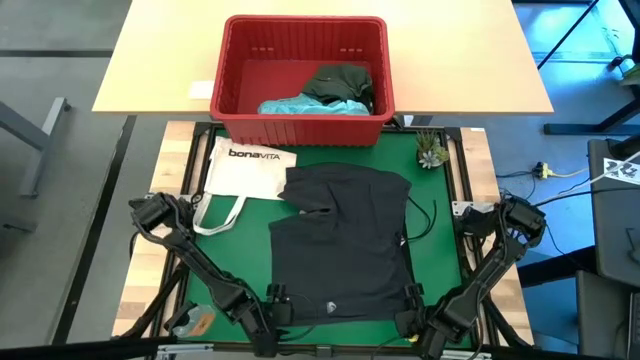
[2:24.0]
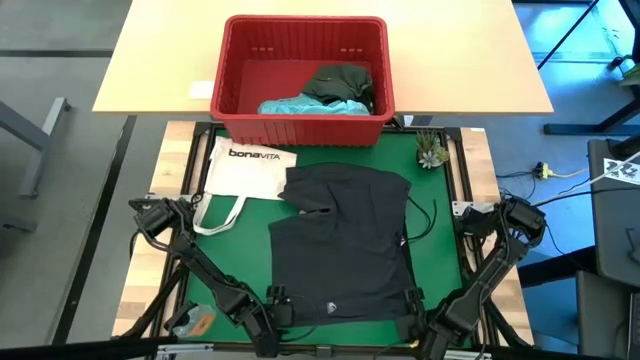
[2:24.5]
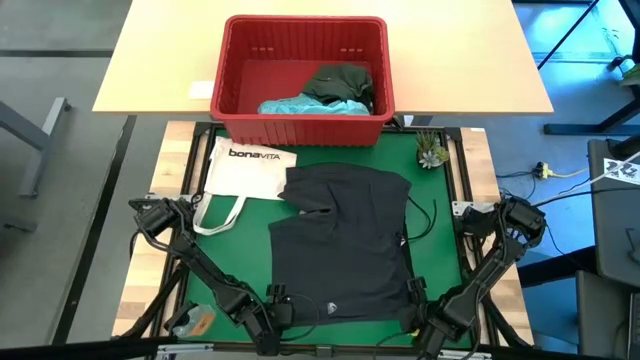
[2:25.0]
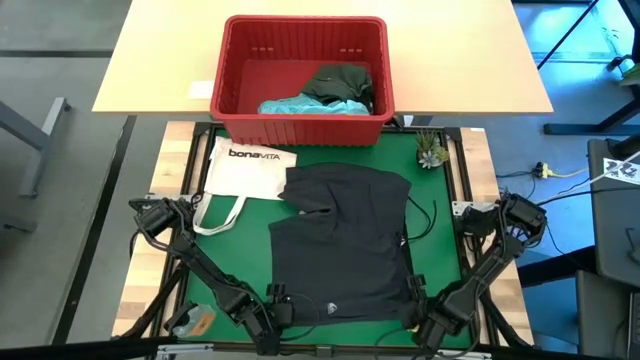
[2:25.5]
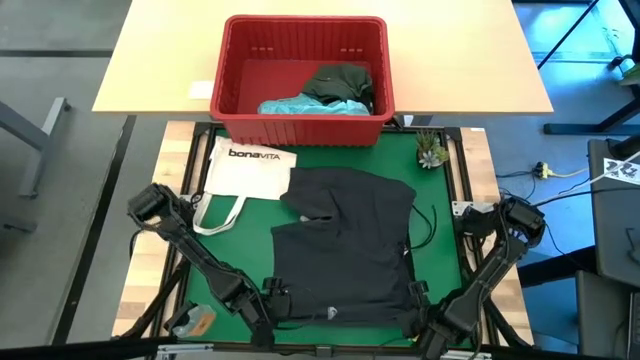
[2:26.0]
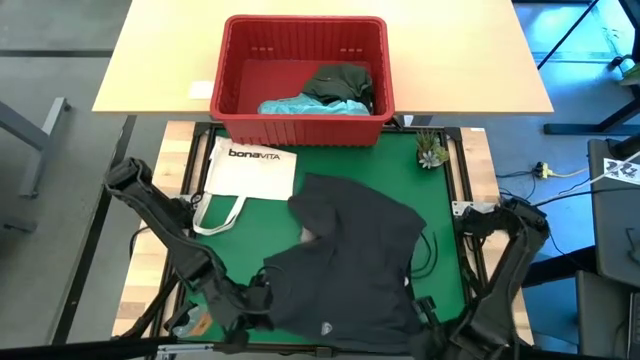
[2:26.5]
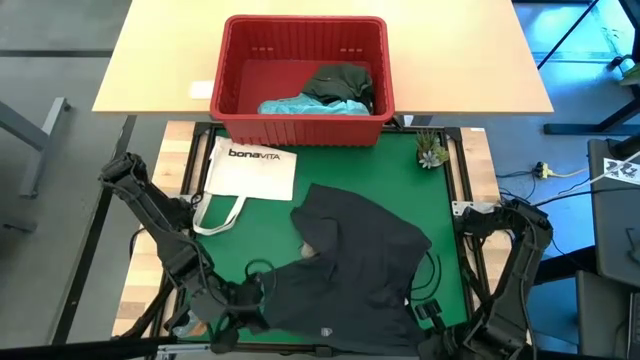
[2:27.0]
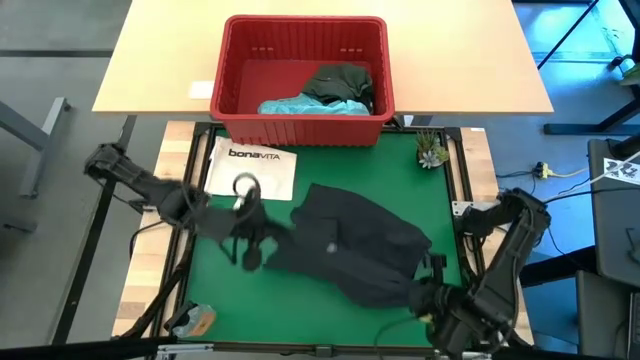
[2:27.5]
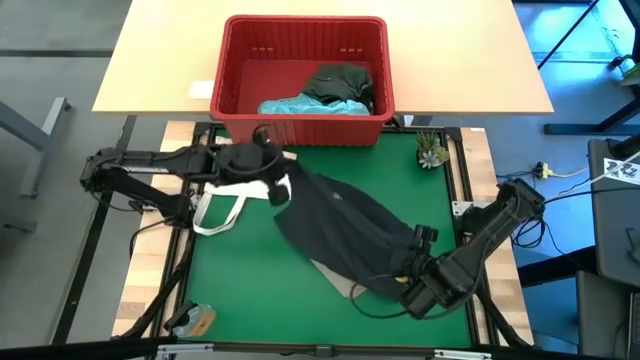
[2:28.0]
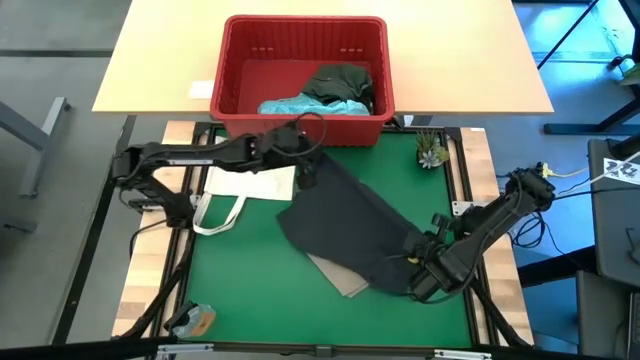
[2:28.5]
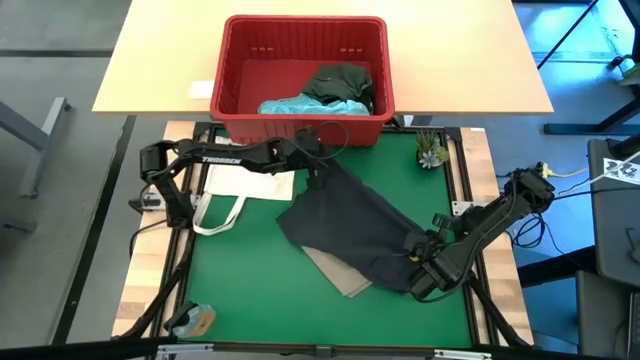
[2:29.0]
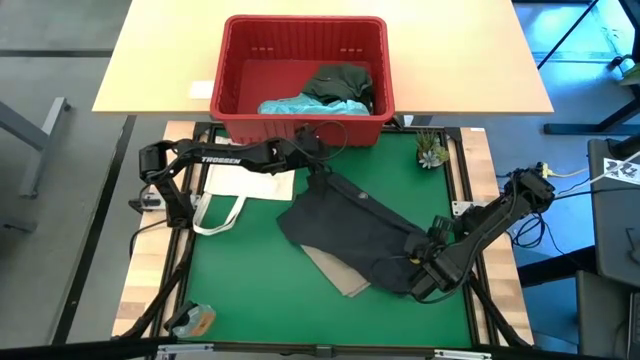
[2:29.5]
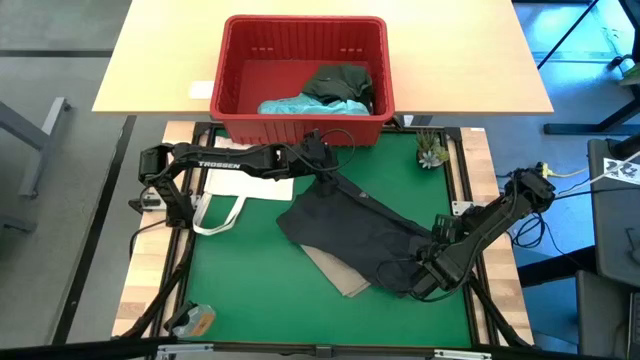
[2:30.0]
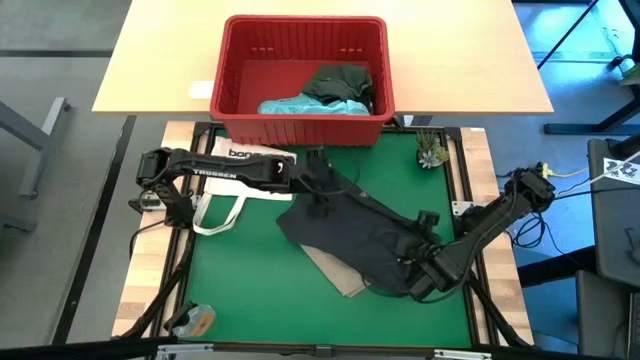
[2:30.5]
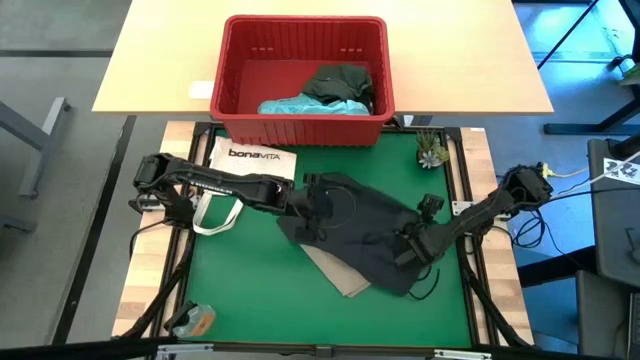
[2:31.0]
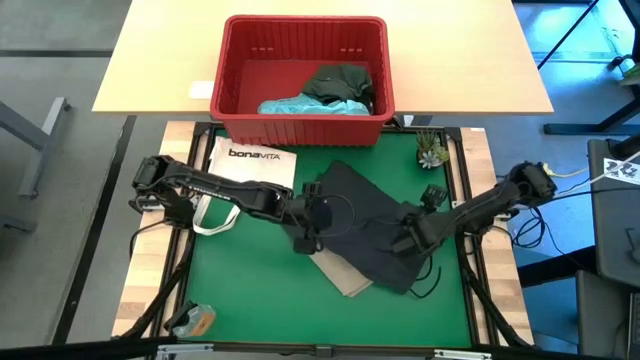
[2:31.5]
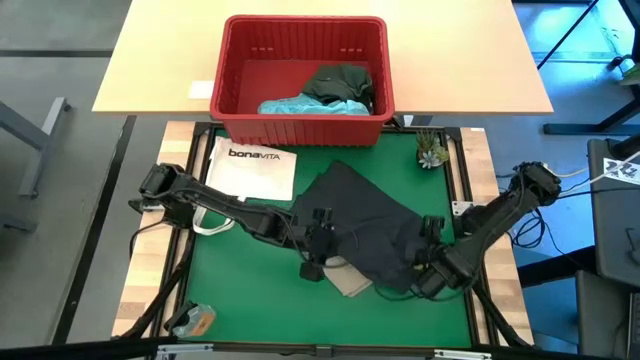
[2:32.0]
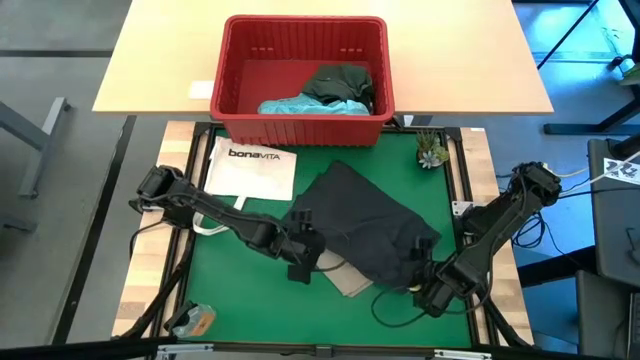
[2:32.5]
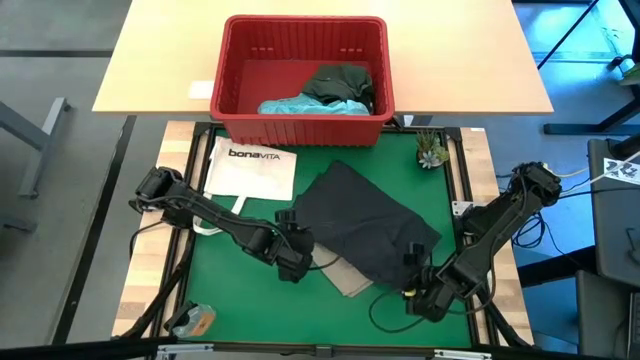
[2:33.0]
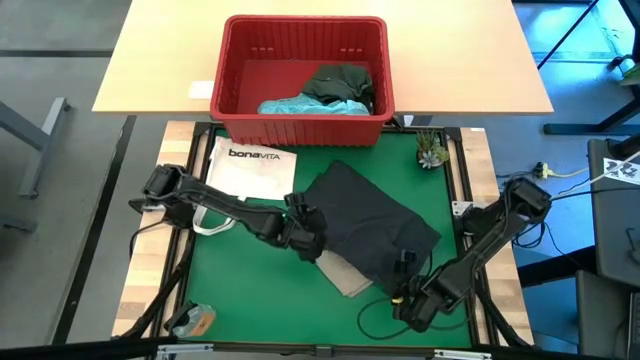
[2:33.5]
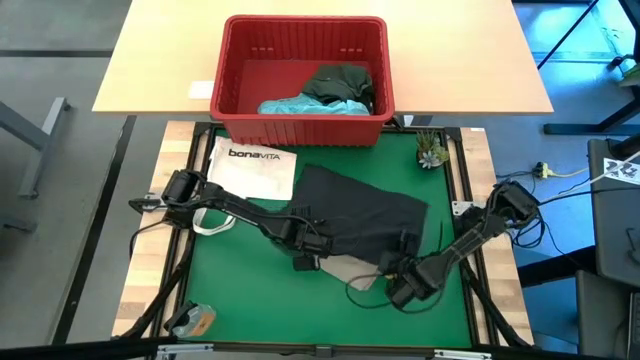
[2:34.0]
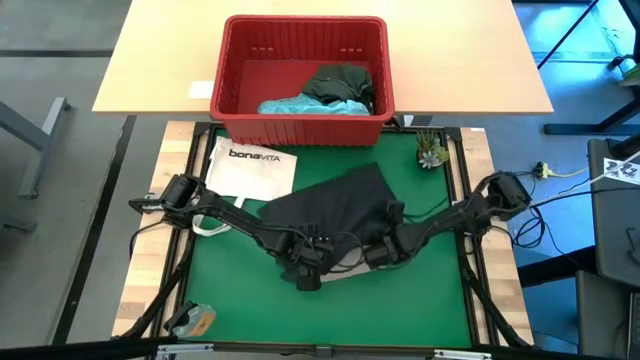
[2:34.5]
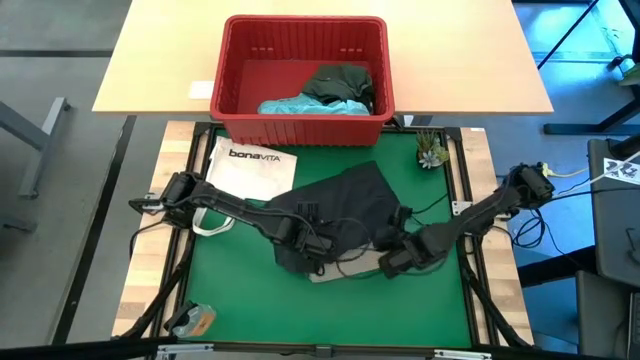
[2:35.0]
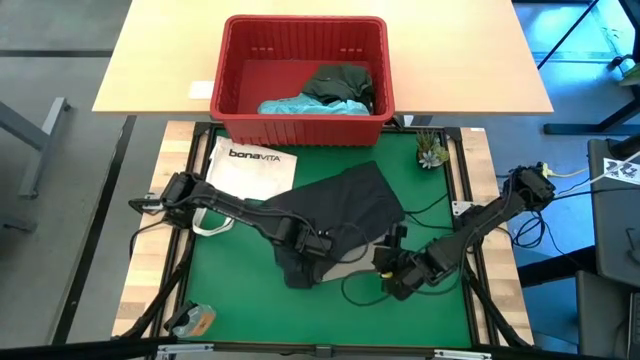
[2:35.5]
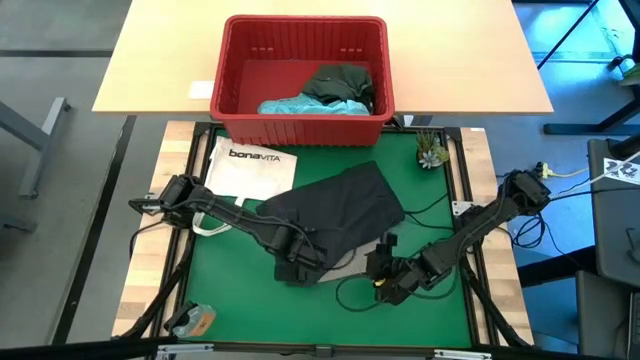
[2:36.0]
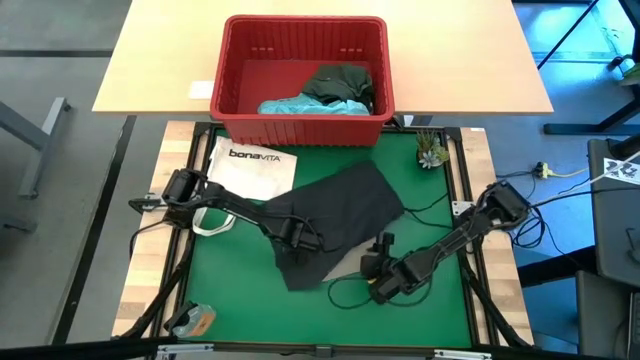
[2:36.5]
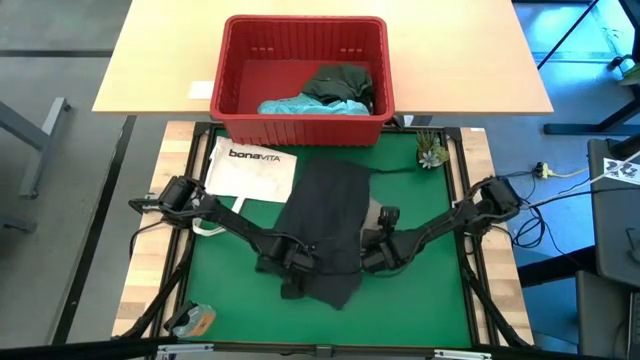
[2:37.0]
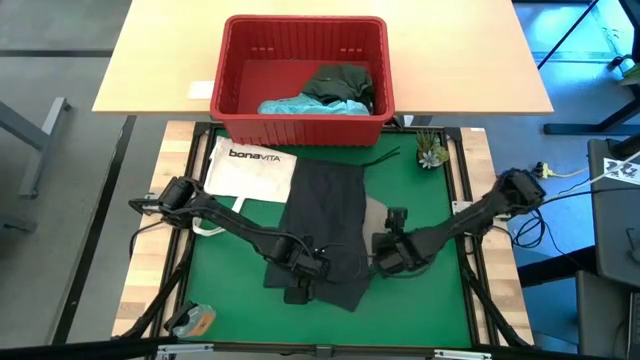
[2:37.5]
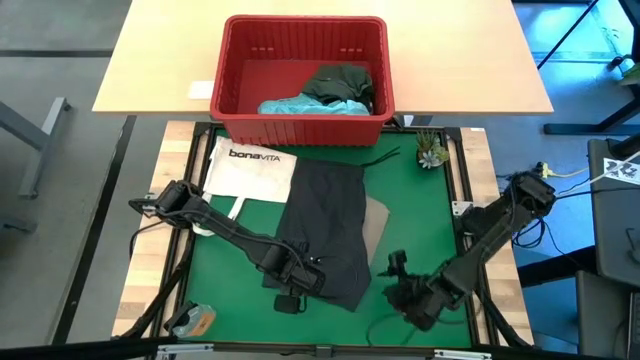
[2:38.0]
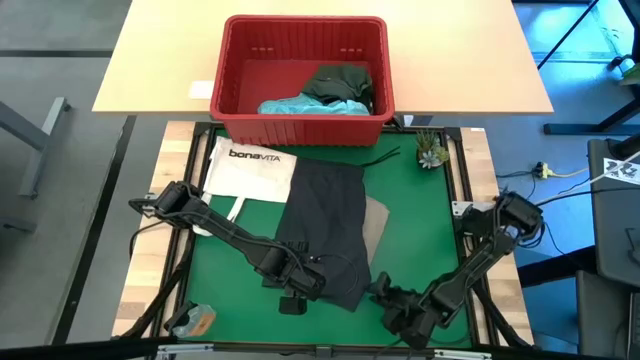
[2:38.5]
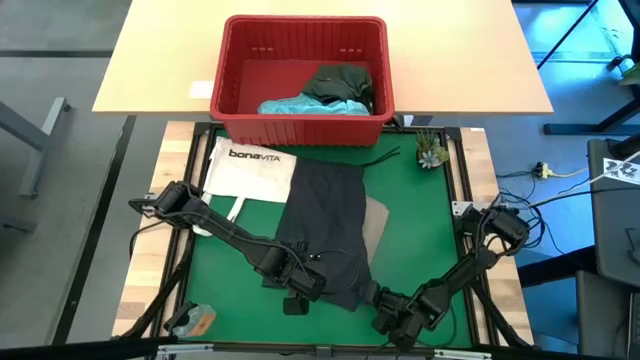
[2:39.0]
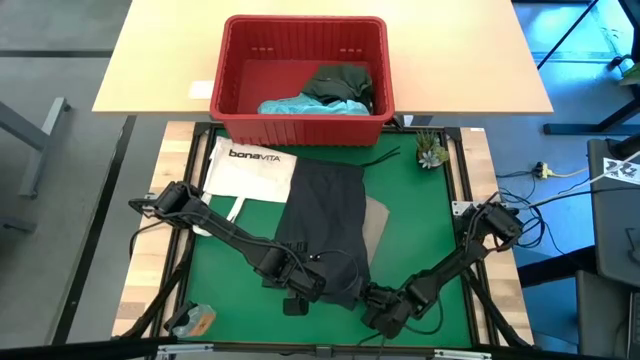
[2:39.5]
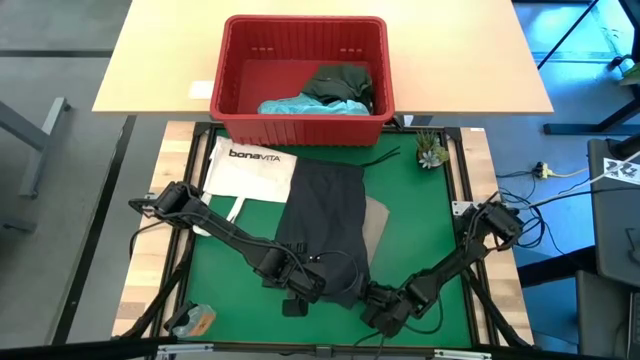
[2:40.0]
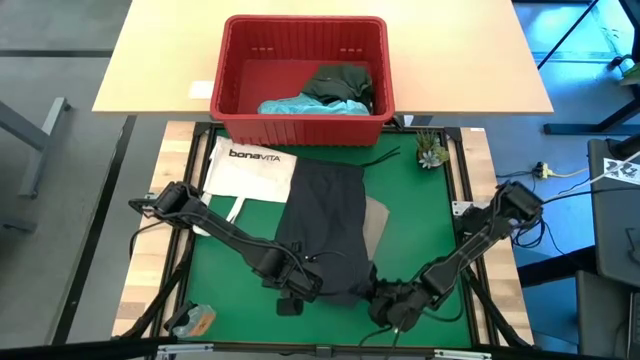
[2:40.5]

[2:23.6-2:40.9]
Task: Fold Laundry from Bin
Fold the black shorts from the red laundry bin

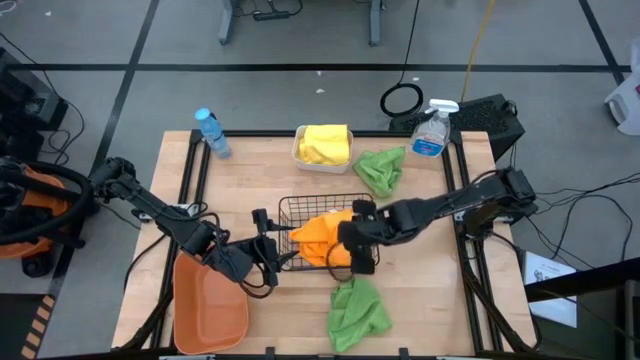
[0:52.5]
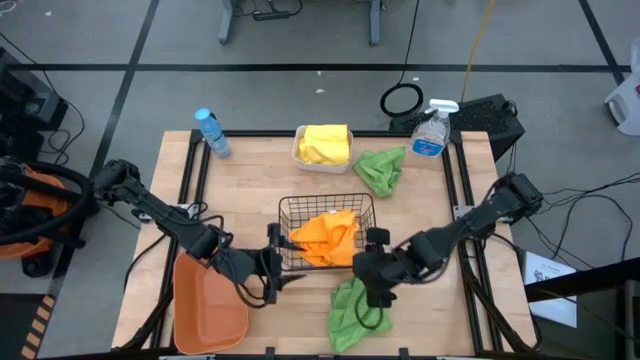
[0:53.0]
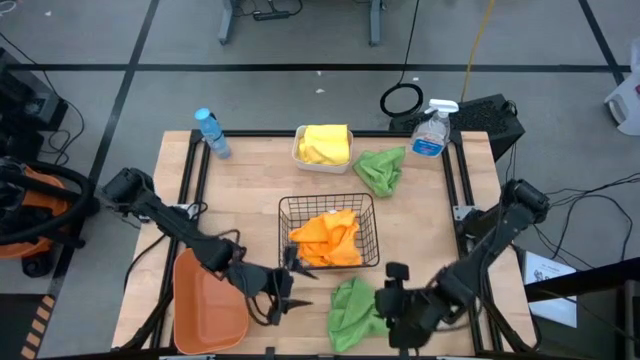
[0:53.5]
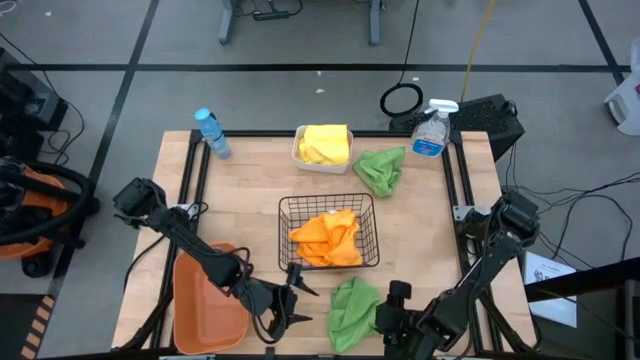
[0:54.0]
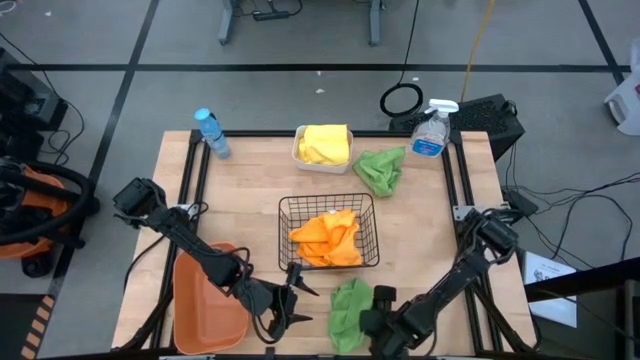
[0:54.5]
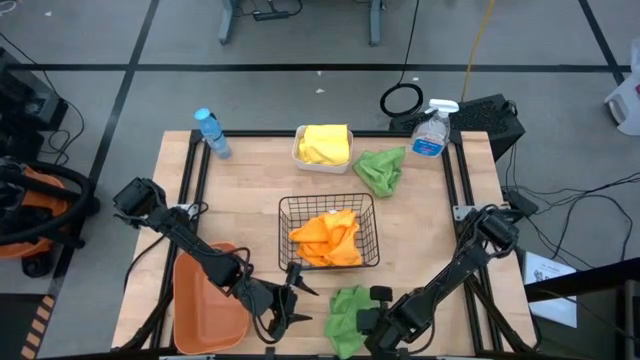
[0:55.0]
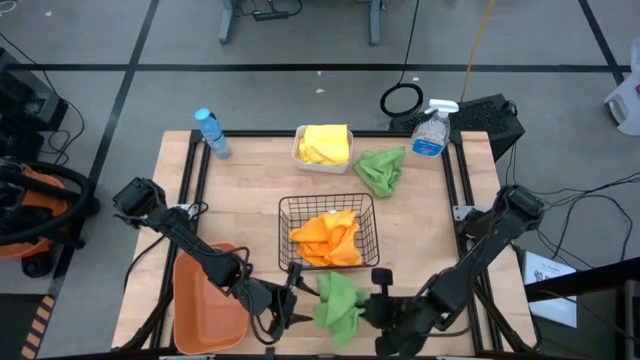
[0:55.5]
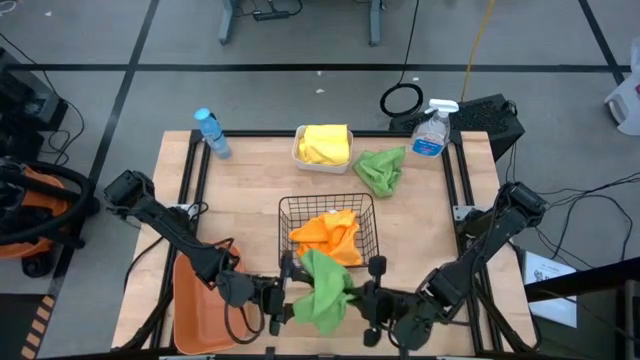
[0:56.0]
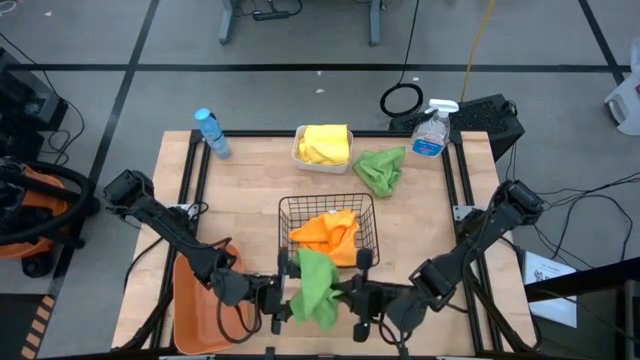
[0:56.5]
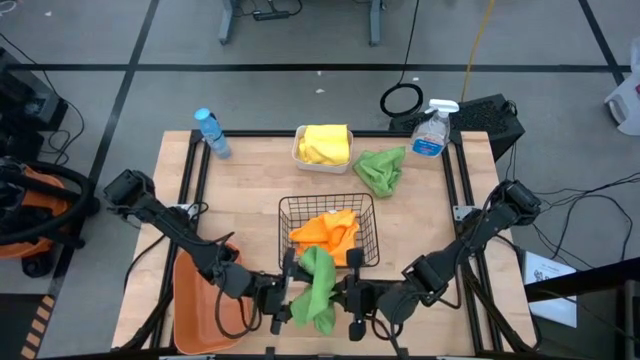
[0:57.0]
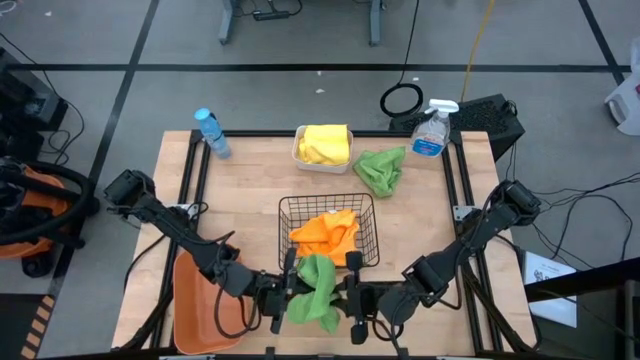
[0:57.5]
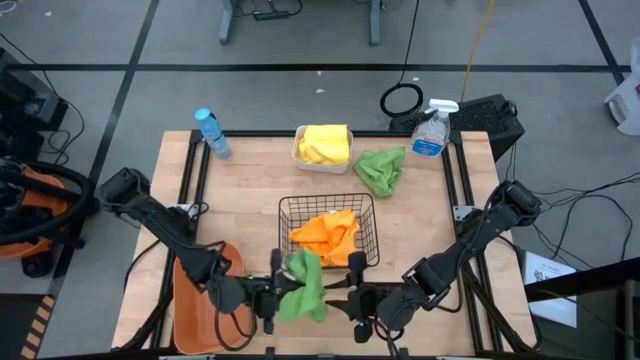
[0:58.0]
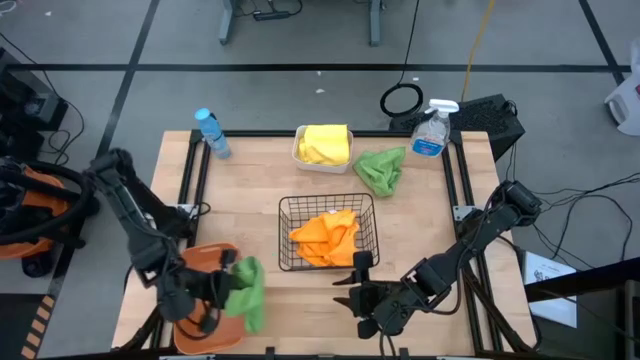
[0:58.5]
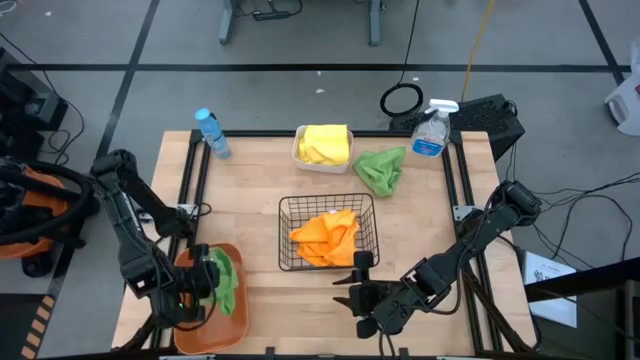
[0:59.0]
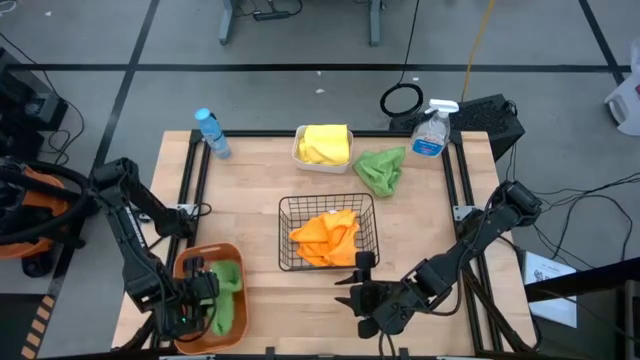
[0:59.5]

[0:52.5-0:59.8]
Task: Sort microfiber towel by color & place in baskets
Put the bottom green microfiber cloth into the orange bin
